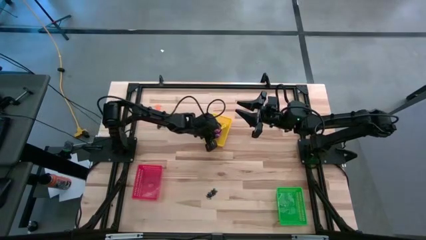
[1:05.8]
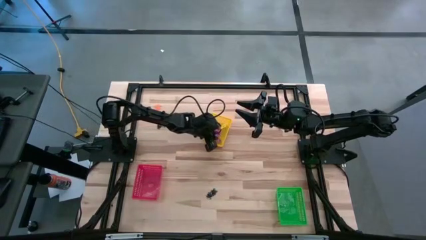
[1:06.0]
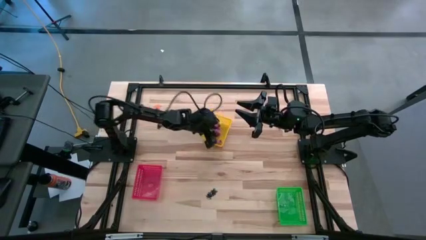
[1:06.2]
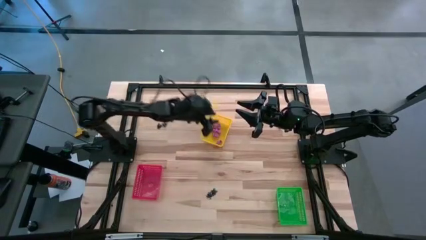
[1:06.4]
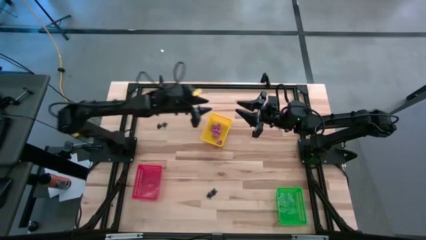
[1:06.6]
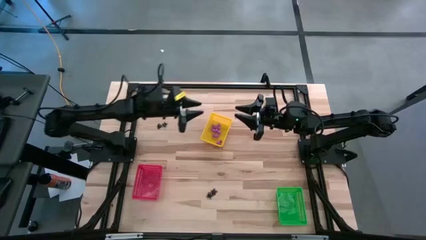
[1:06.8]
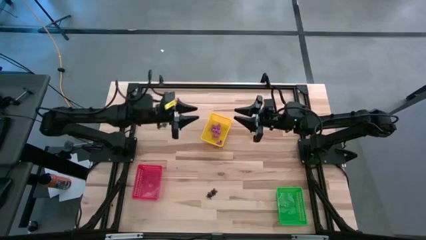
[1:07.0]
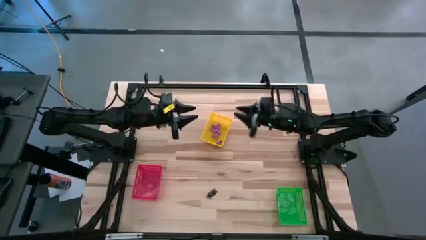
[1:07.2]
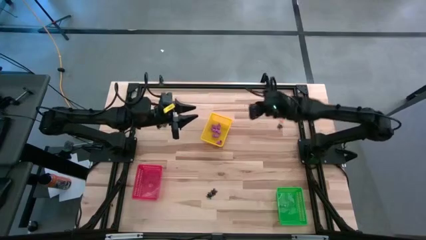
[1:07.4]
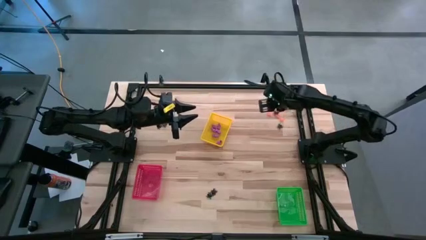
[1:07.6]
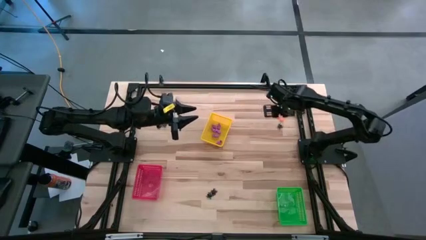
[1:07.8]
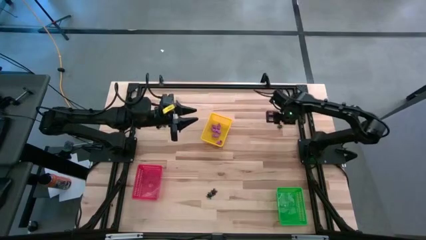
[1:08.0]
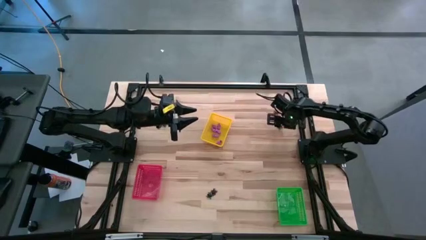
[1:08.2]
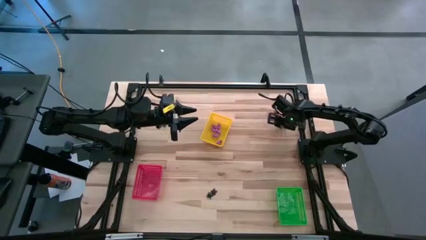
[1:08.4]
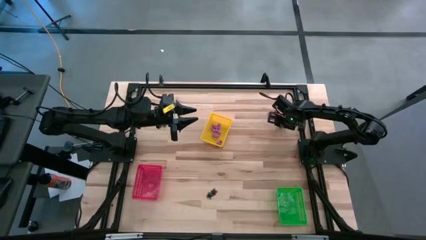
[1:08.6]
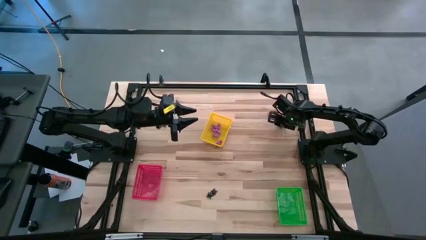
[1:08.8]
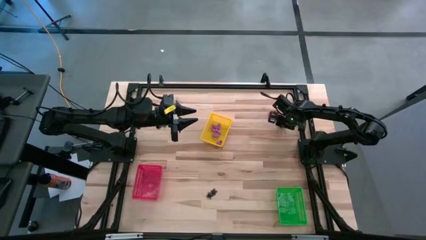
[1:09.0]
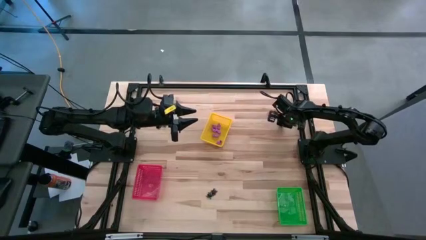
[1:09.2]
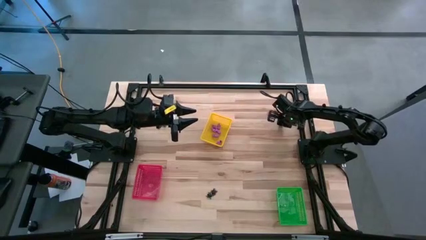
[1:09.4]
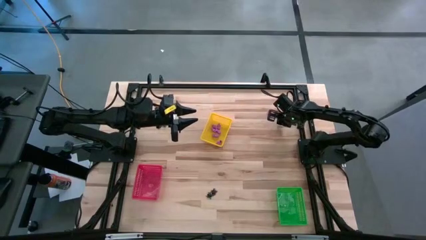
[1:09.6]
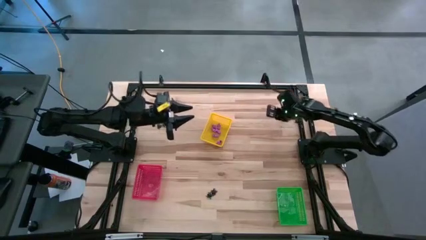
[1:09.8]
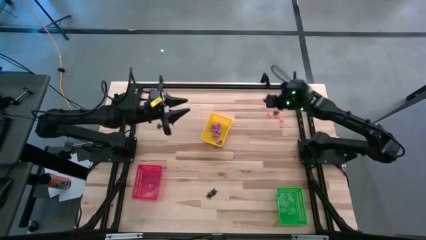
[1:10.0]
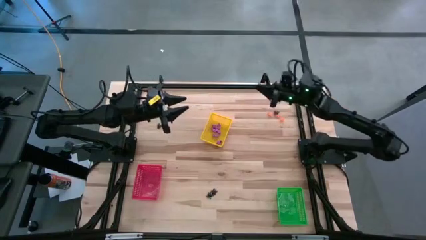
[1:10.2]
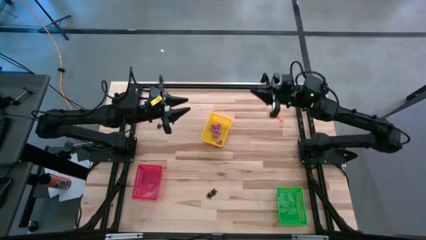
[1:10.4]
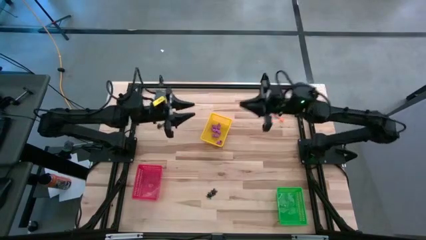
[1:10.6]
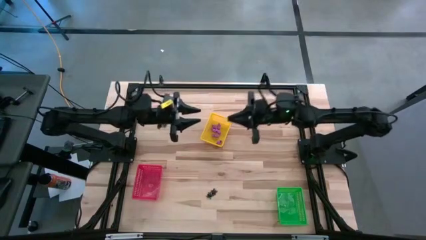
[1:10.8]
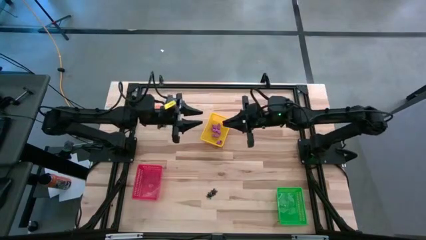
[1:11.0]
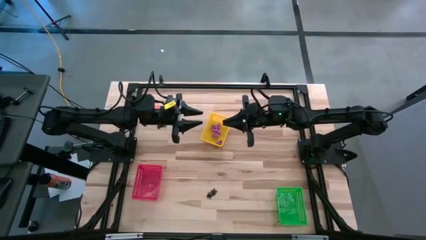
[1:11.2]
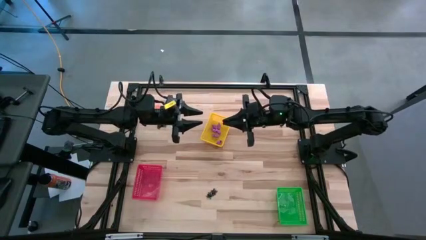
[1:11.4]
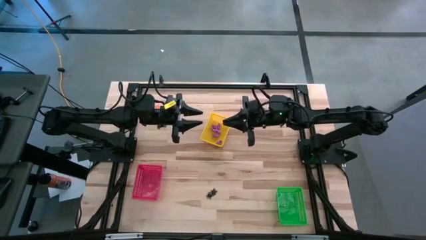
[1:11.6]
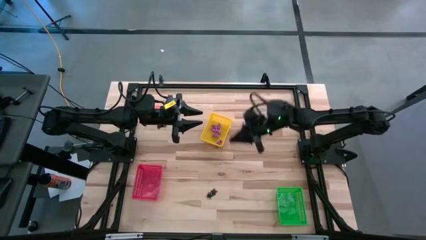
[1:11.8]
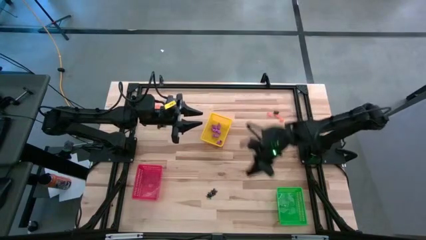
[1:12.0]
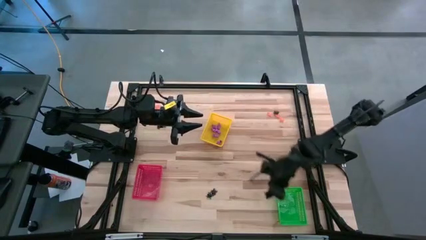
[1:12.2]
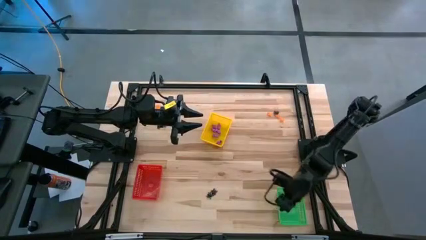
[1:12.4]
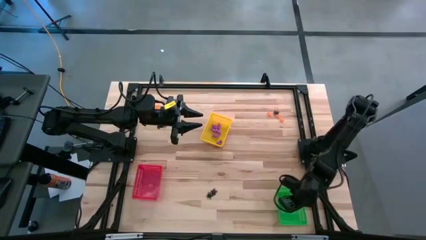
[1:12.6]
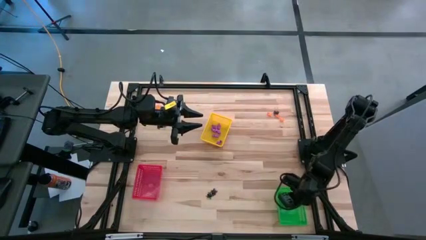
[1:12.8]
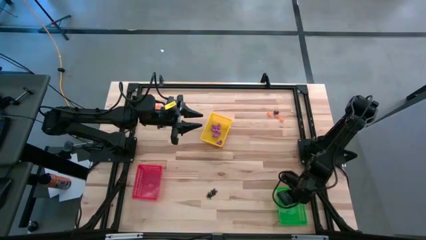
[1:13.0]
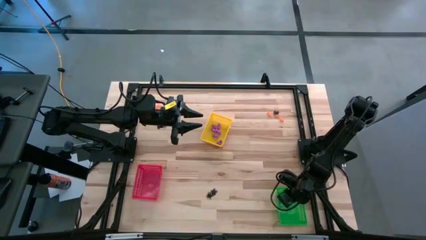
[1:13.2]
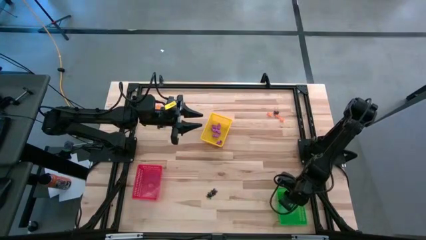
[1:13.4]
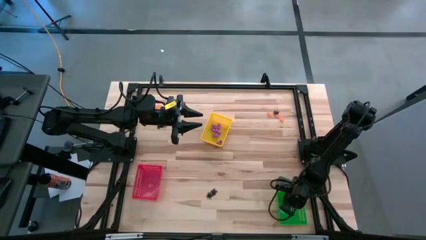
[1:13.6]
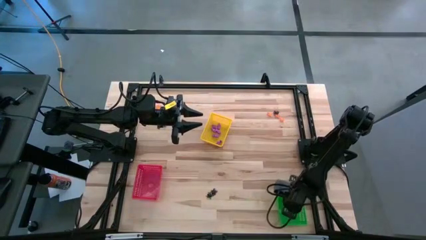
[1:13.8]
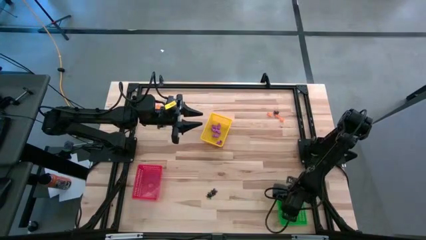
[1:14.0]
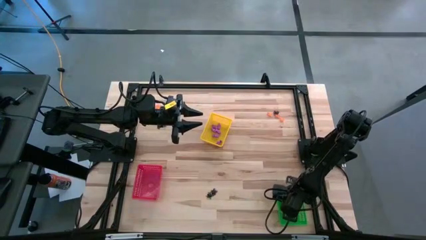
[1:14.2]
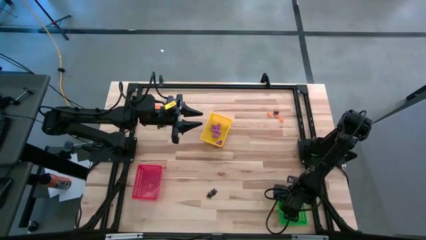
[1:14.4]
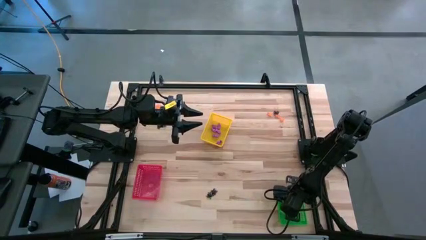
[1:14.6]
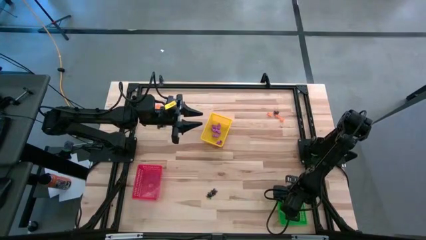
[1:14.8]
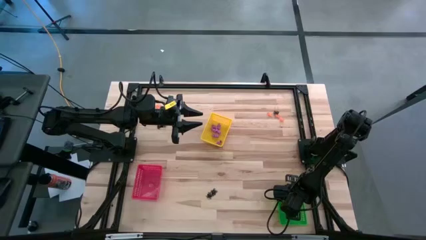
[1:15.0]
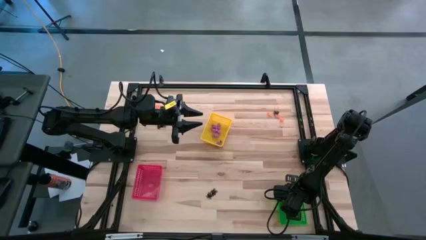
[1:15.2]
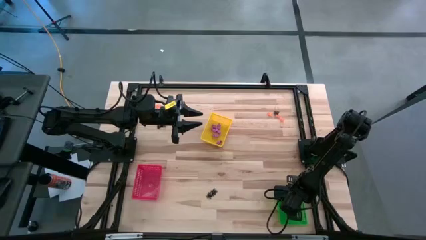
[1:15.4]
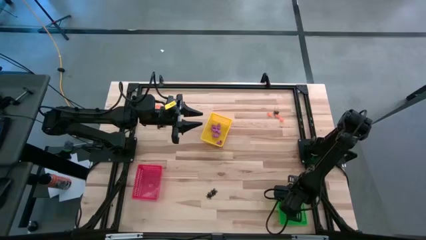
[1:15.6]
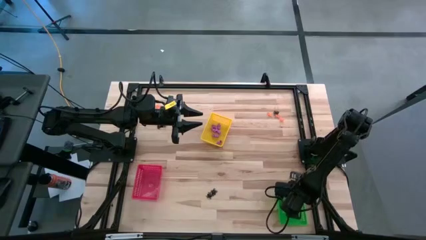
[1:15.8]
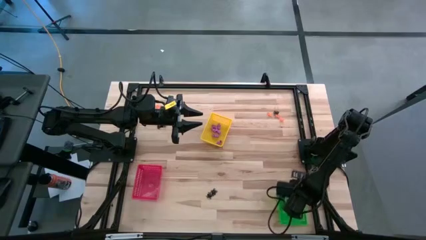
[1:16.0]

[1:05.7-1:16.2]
Task: Sort Halloween decoration
Put the black spider toy into the green bin
